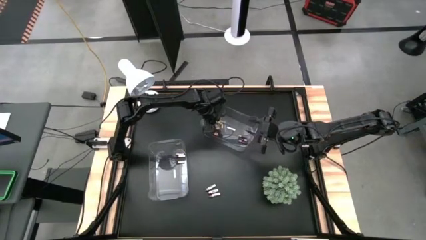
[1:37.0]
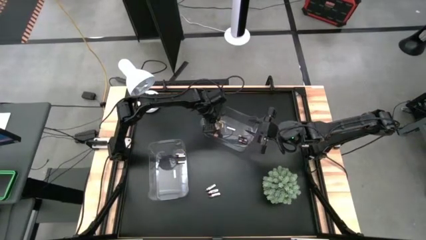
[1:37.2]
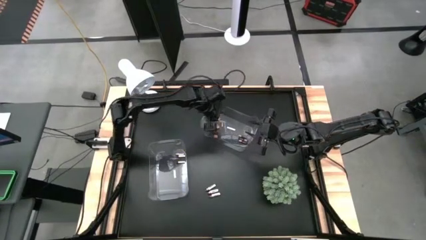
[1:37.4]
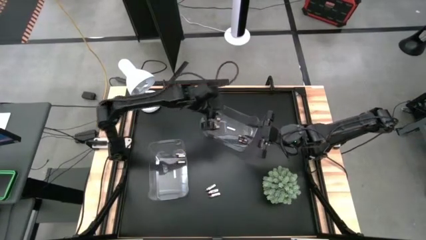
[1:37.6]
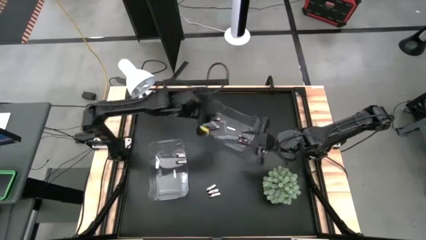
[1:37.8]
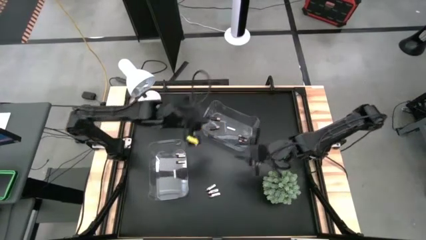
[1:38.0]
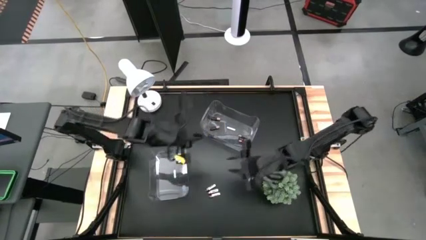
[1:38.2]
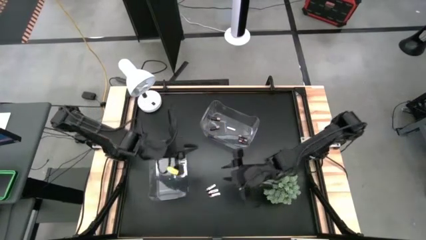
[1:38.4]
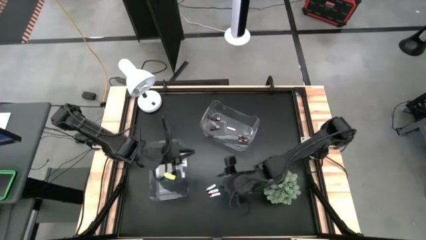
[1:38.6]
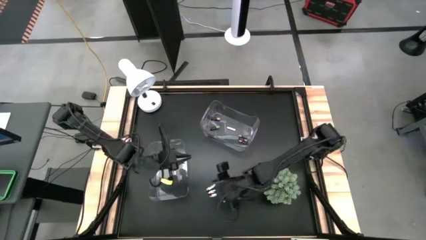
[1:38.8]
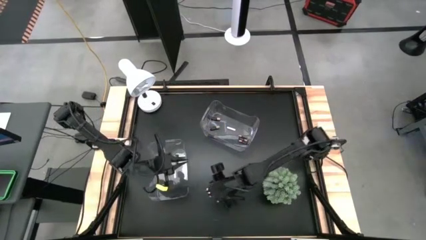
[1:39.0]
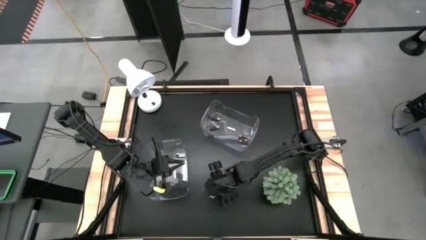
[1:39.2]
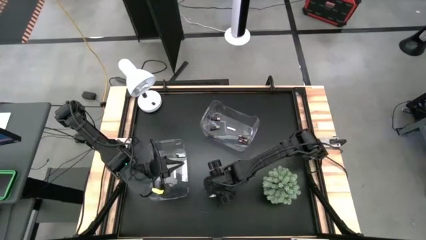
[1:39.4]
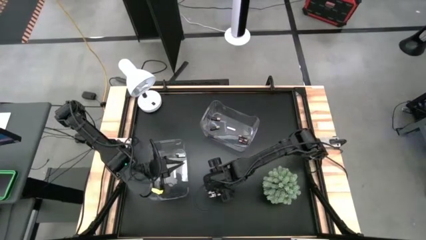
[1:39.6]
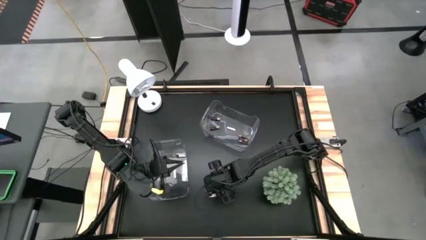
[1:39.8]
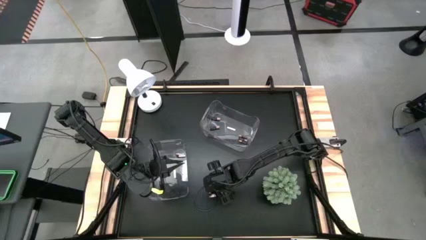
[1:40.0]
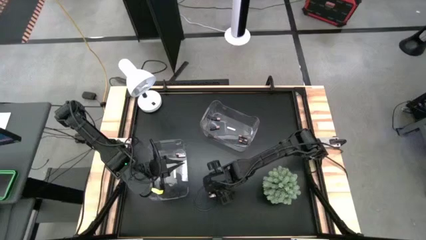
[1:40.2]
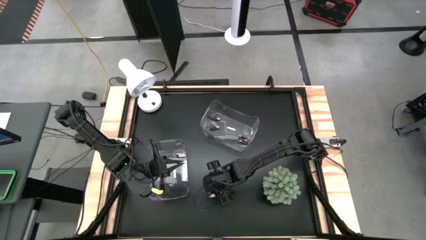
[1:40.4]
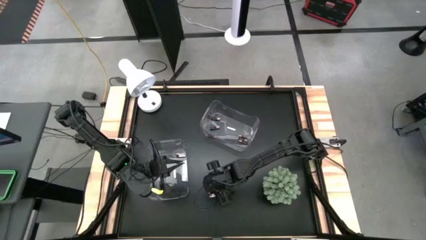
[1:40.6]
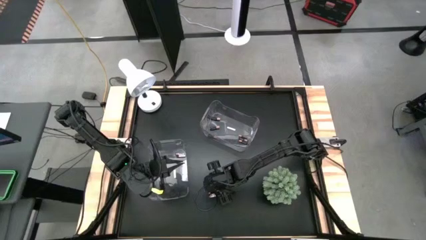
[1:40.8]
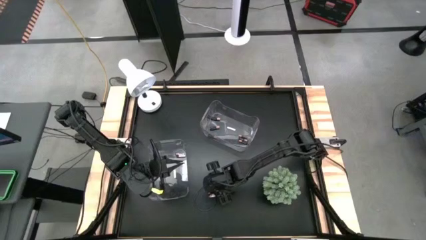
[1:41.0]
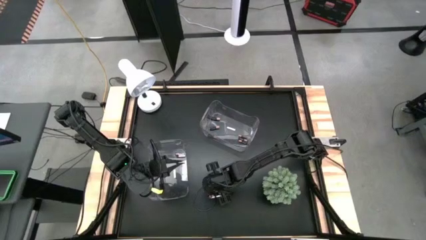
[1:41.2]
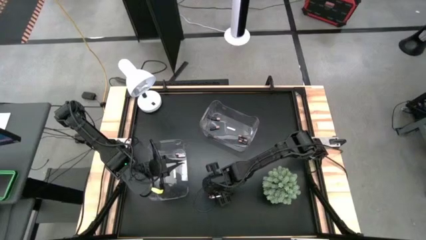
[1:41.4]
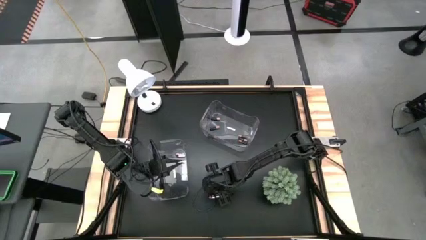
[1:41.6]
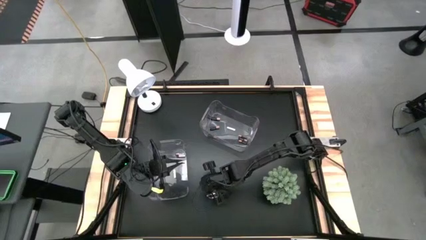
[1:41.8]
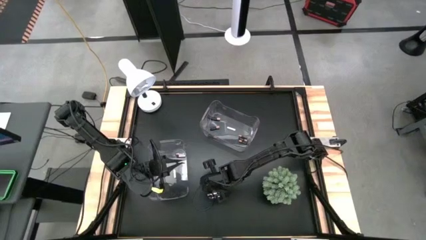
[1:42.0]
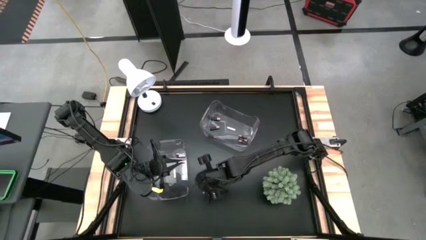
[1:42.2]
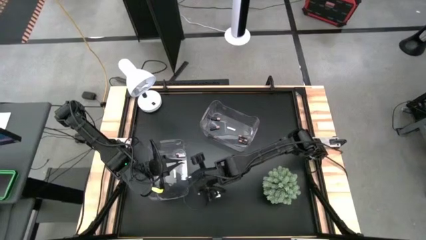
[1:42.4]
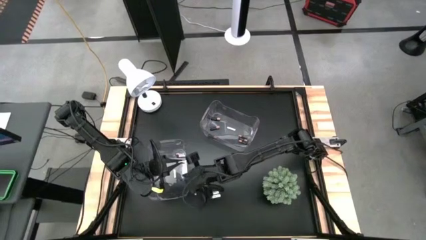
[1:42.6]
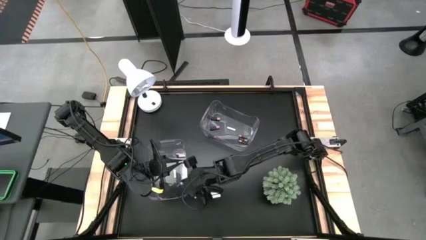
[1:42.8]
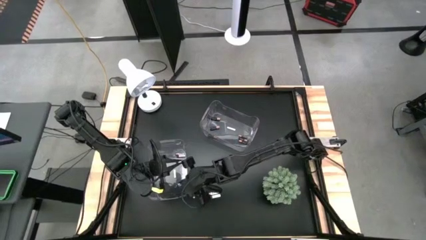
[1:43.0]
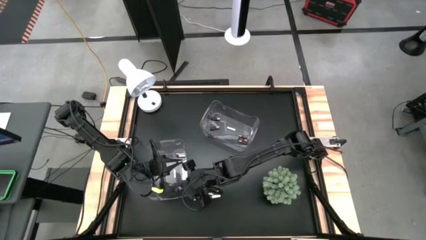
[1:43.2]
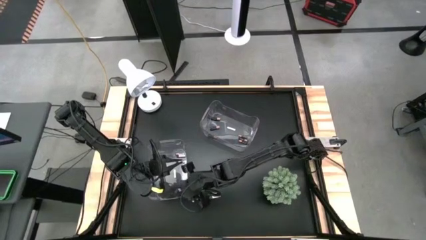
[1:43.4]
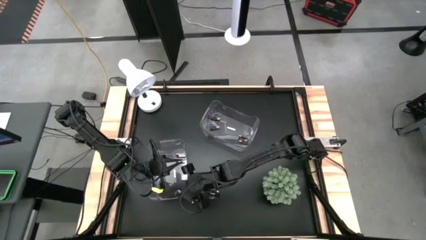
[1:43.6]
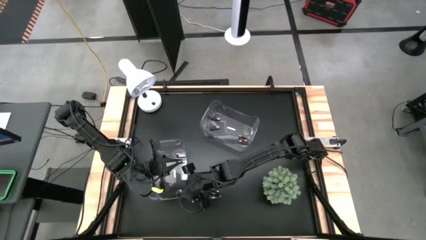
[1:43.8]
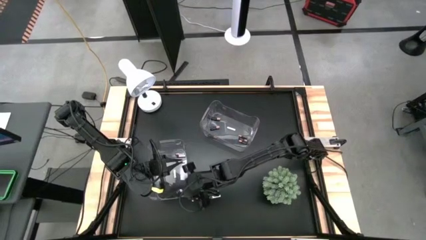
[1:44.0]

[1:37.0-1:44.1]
Task: Sort batteries
Put the silver battery into the bottom transparent bin

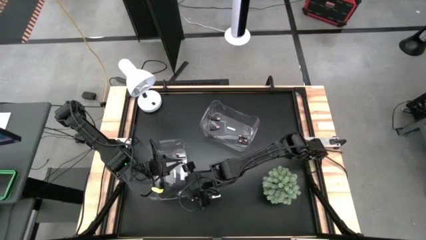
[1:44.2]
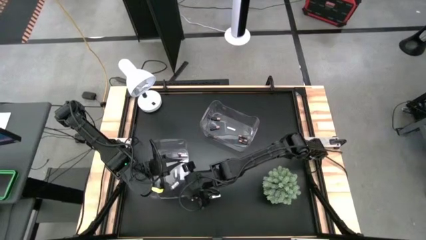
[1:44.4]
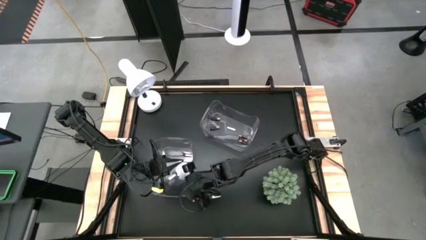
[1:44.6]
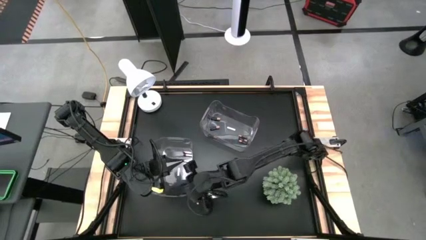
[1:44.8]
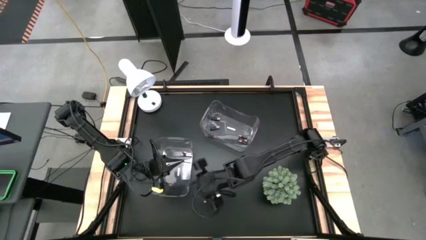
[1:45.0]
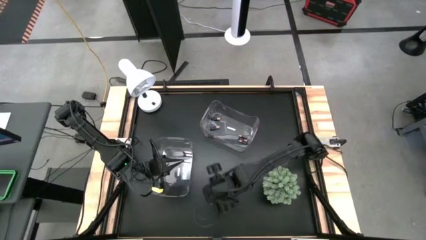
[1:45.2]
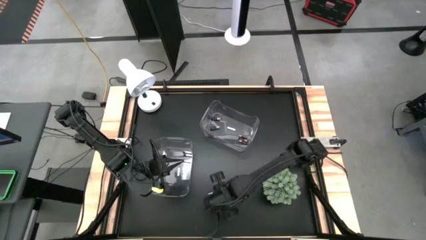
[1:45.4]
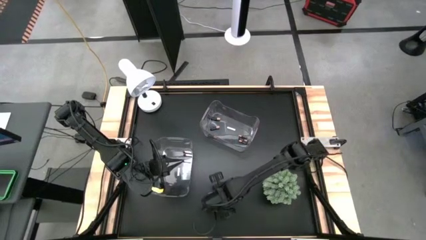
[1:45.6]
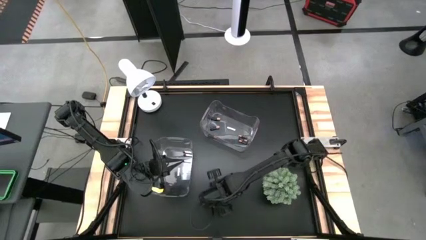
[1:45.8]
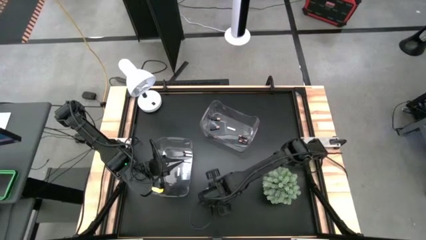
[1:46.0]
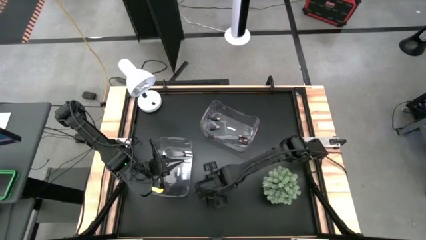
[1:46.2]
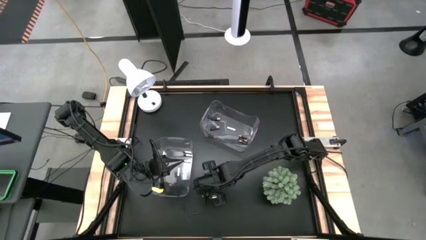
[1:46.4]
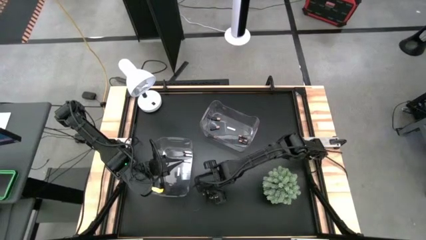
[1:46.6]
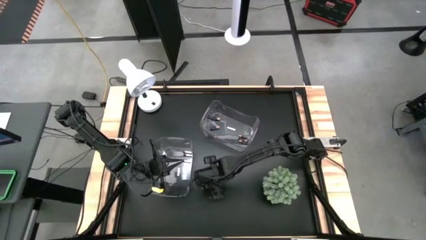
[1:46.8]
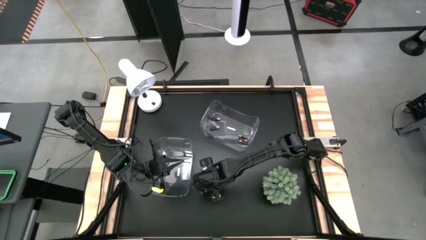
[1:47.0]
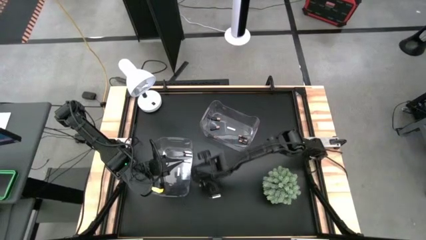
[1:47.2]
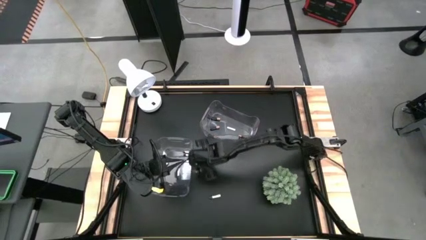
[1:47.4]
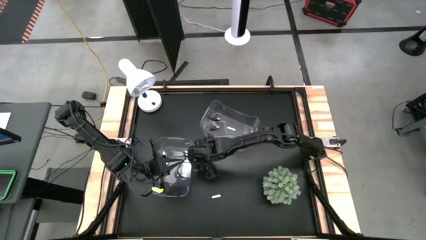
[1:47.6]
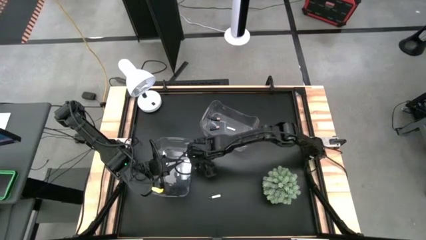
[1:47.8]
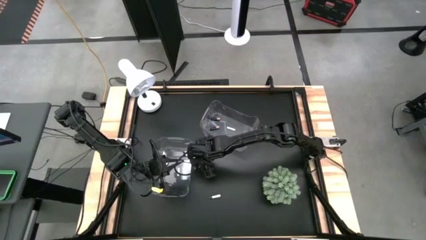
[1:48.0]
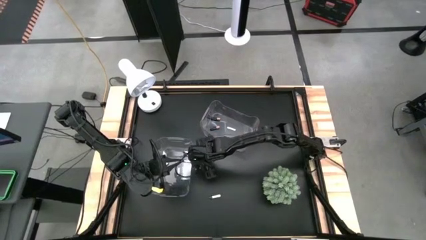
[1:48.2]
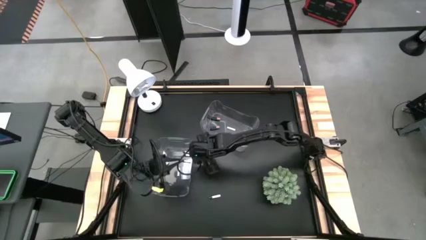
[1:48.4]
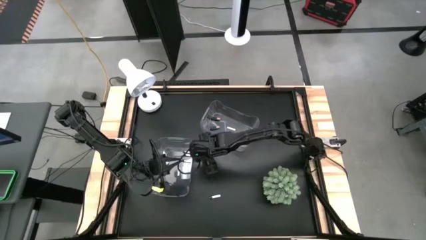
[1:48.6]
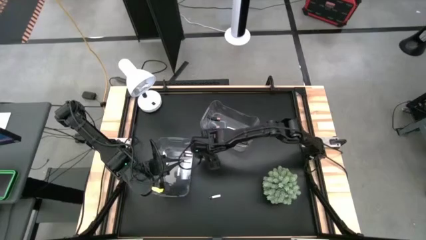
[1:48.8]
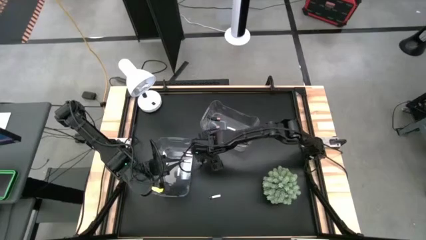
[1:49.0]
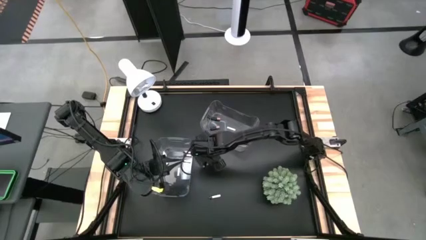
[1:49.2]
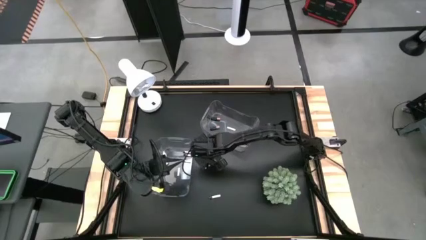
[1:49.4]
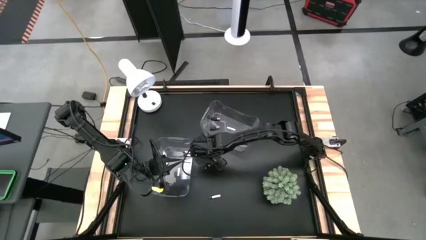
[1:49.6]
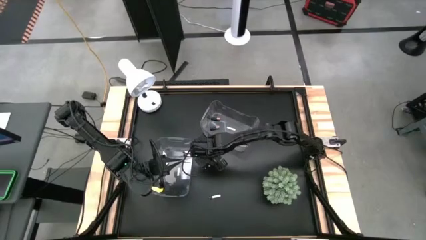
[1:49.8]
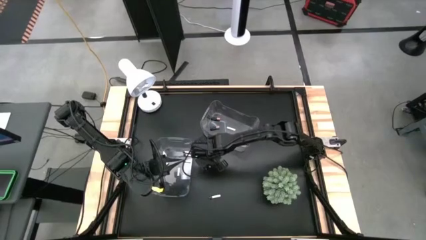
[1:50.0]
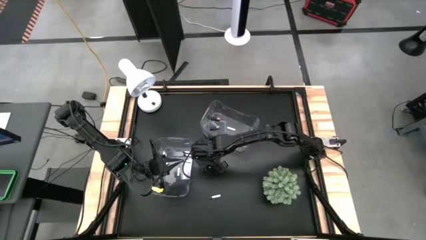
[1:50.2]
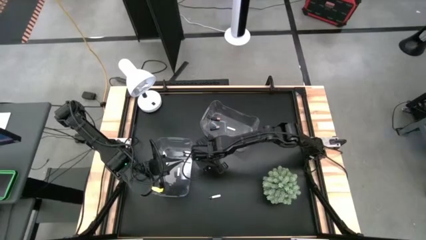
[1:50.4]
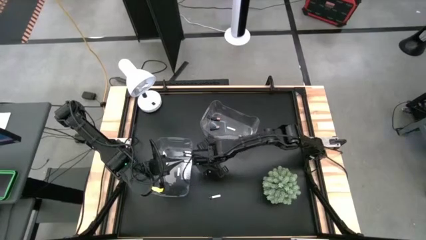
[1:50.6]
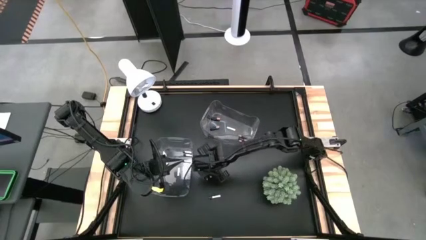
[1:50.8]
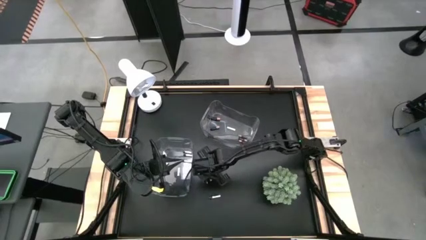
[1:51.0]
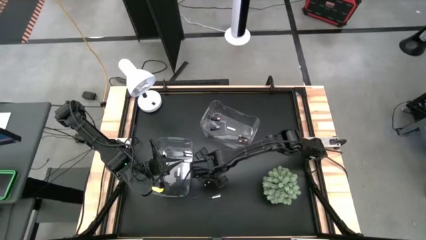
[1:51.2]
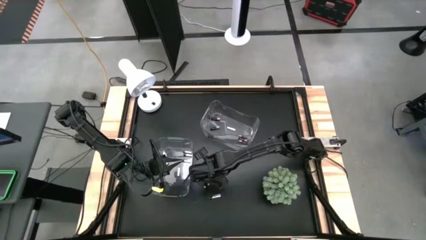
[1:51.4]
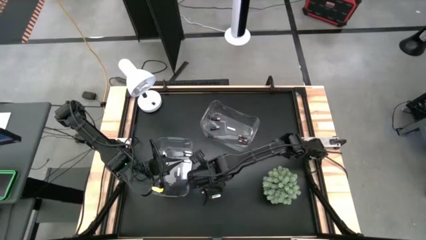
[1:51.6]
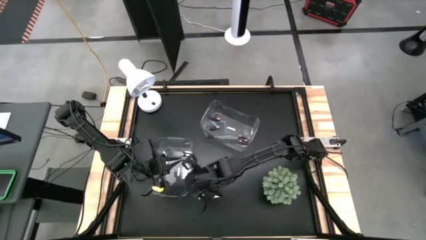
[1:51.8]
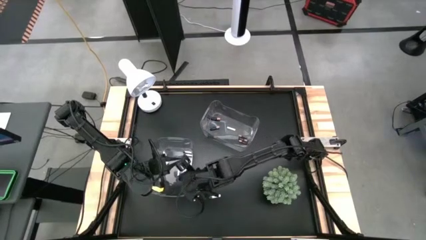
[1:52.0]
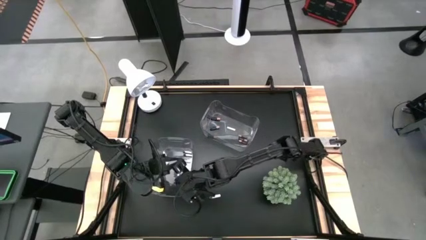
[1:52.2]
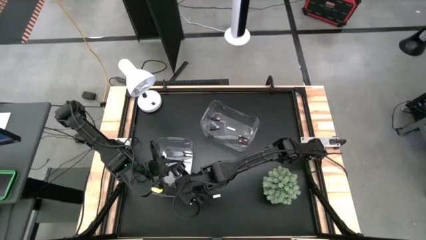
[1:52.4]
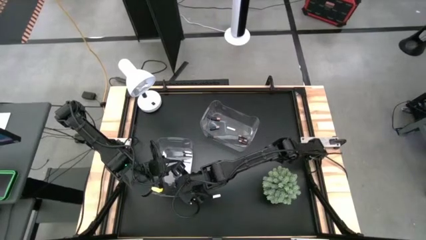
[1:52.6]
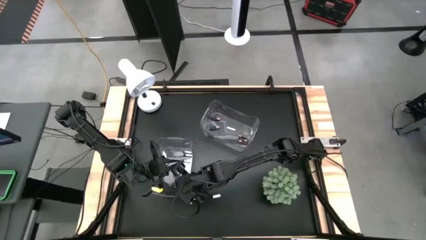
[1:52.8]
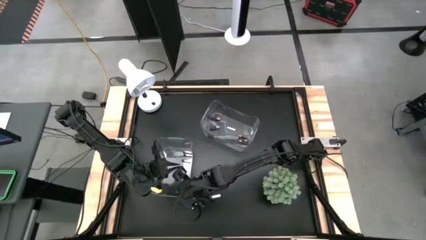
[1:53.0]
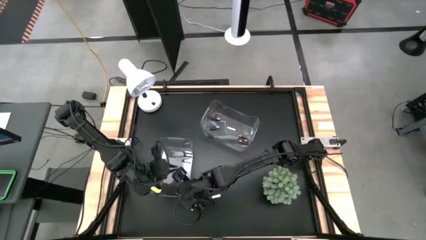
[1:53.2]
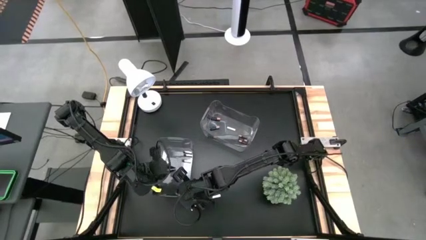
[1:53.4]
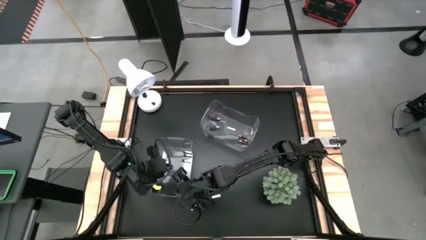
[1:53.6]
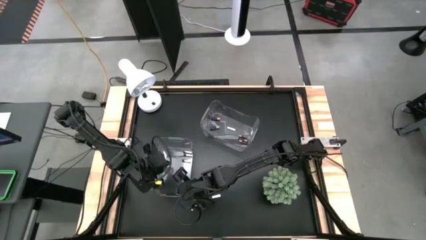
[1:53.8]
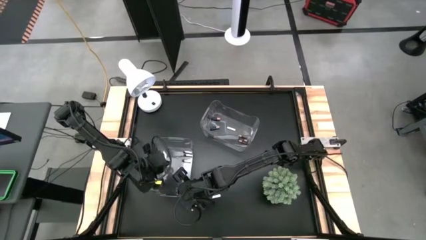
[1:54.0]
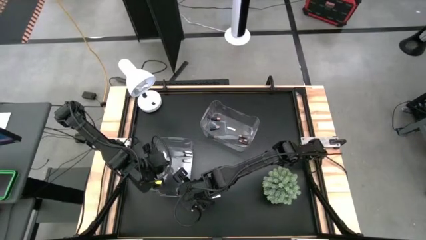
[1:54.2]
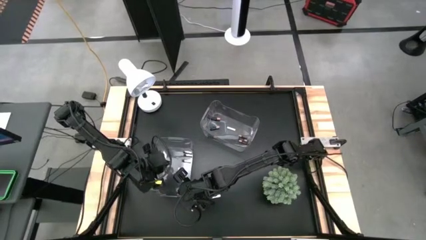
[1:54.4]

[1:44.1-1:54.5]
Put the silver battery into the bottom transparent bin
